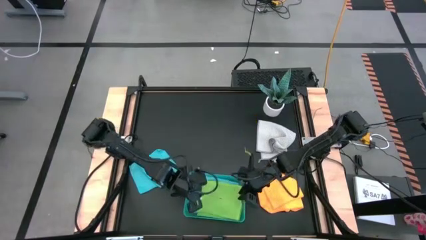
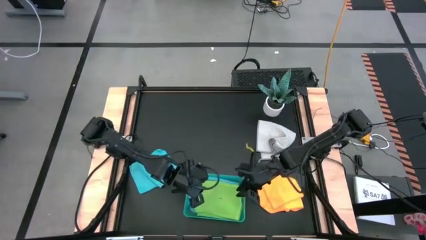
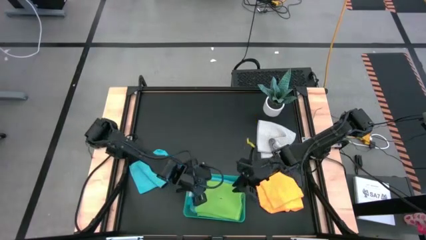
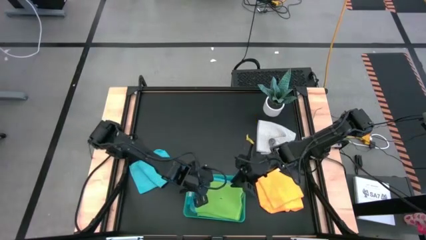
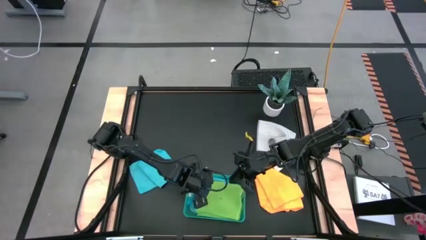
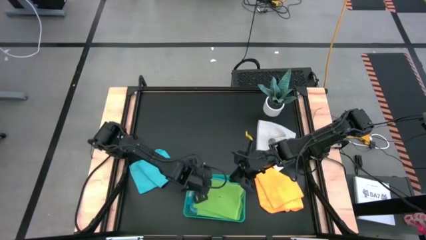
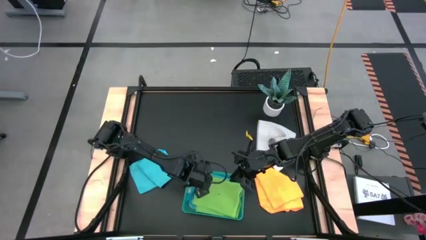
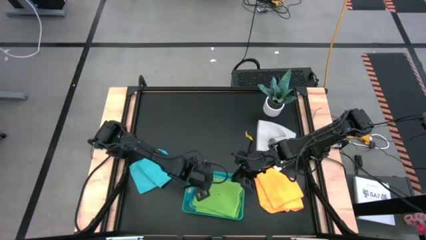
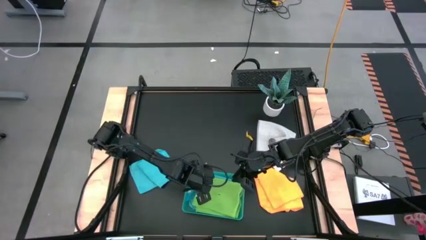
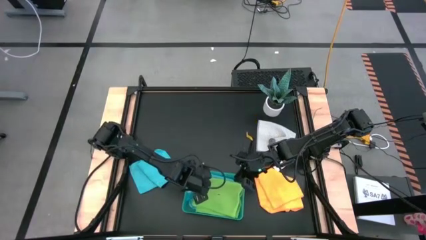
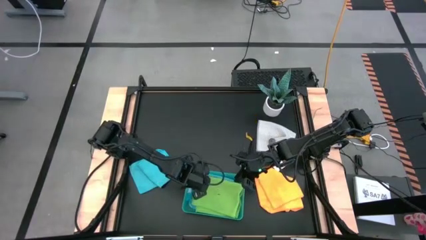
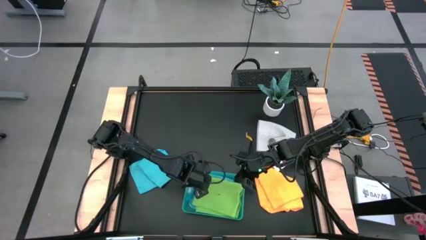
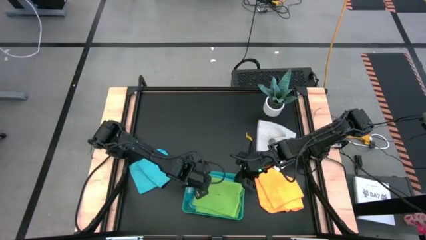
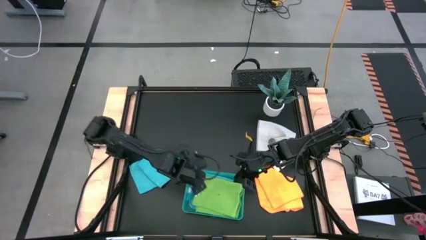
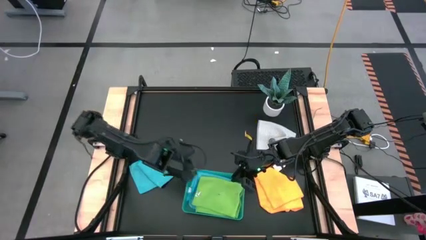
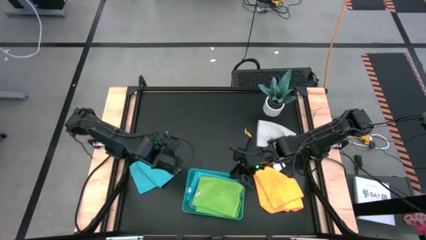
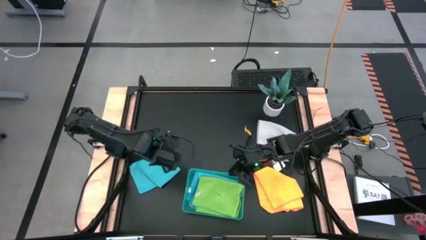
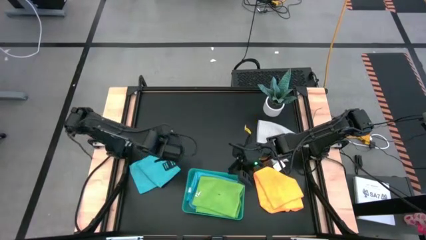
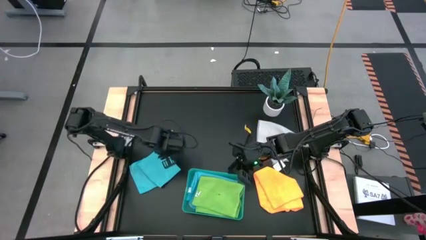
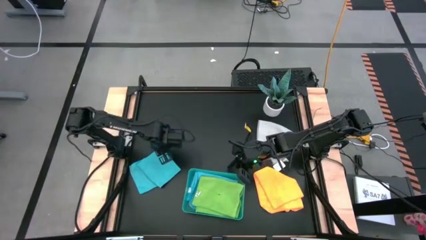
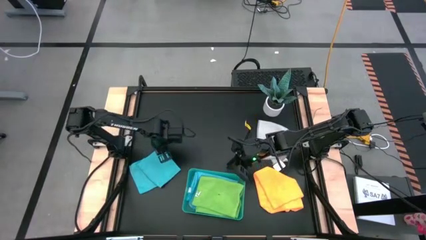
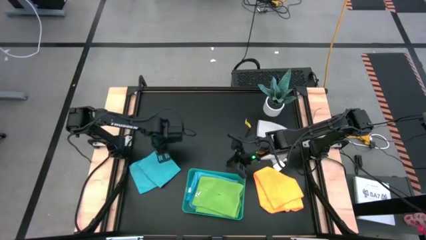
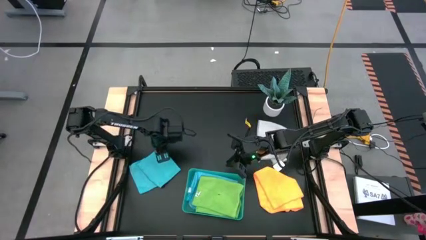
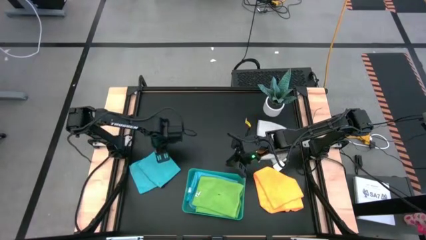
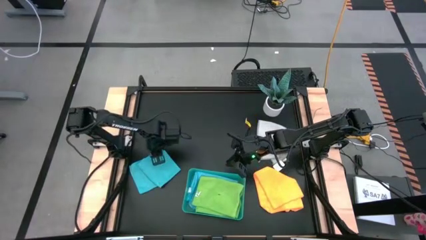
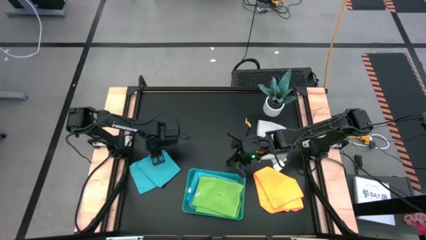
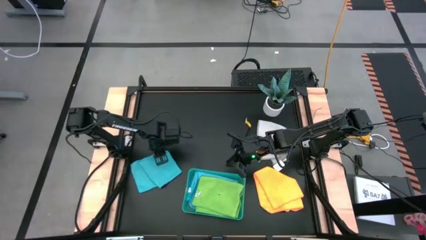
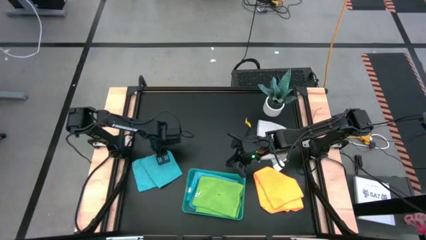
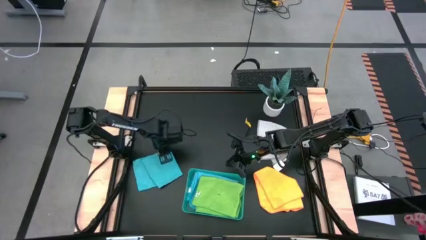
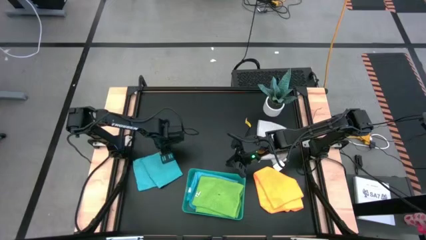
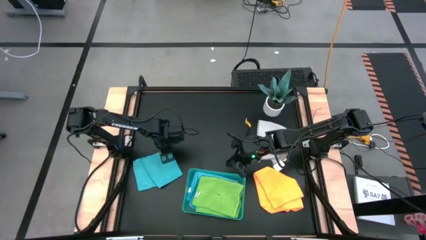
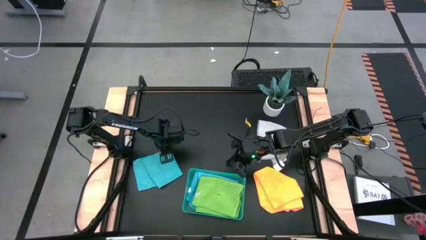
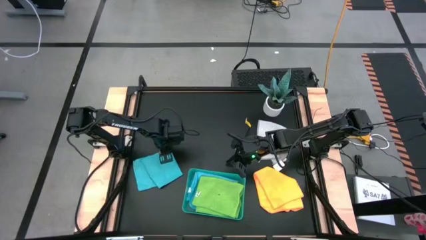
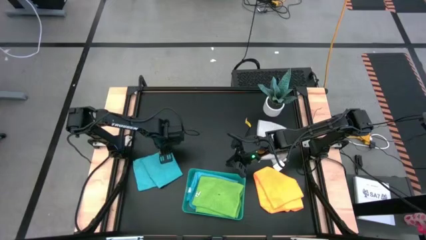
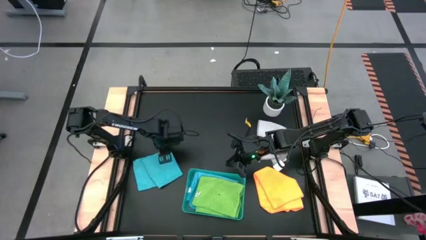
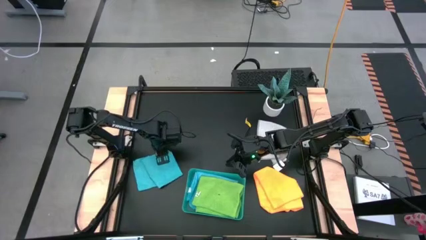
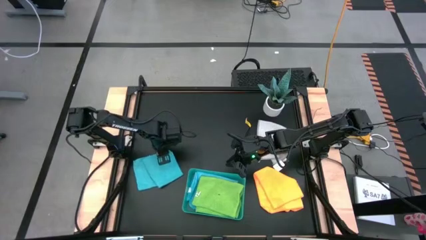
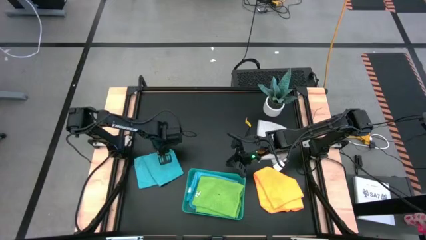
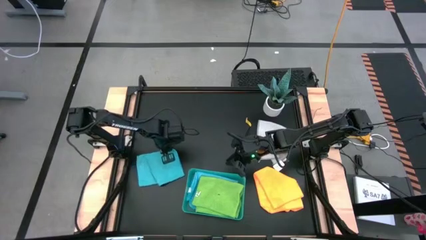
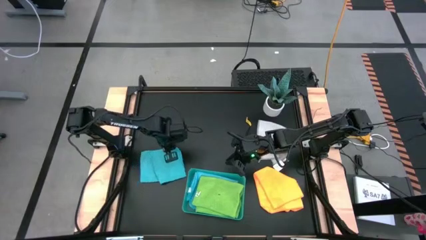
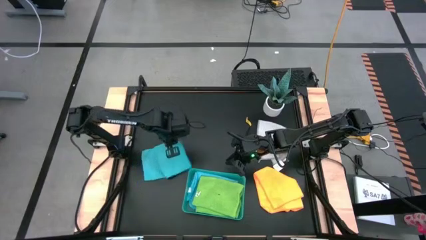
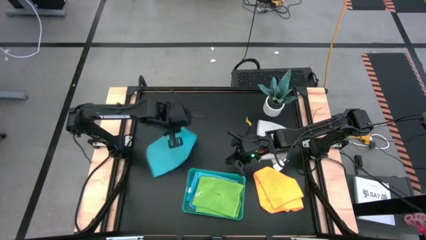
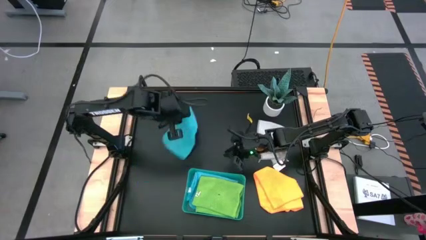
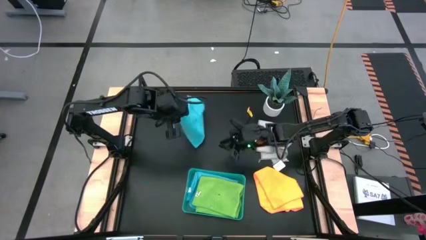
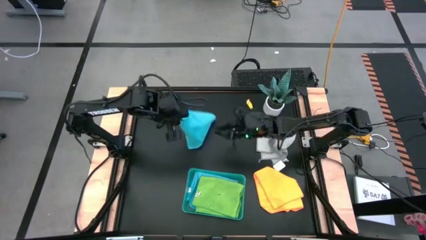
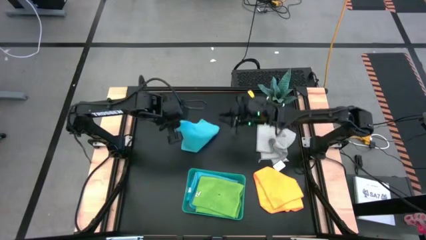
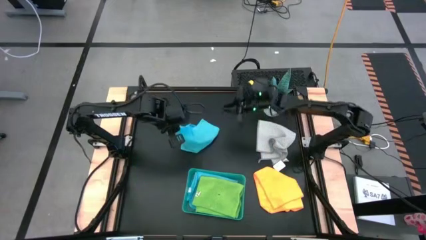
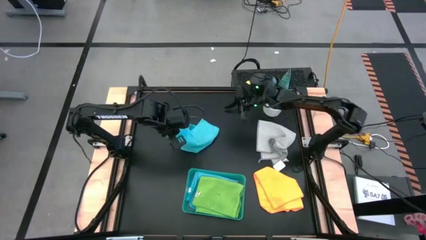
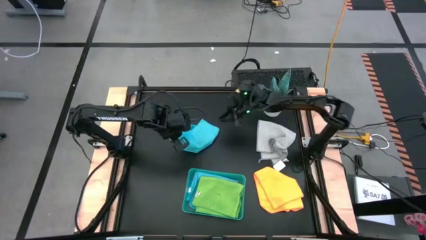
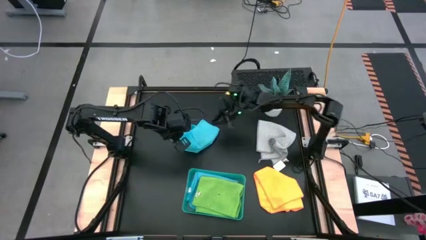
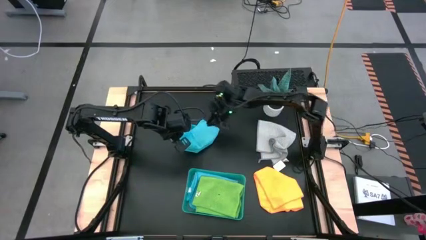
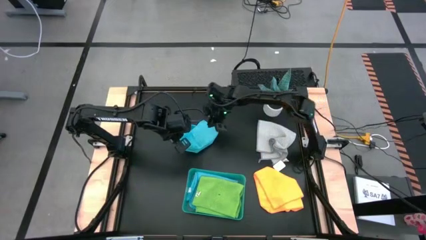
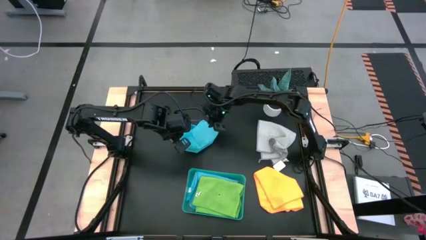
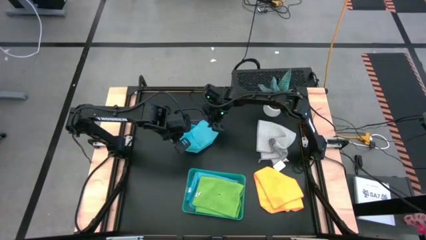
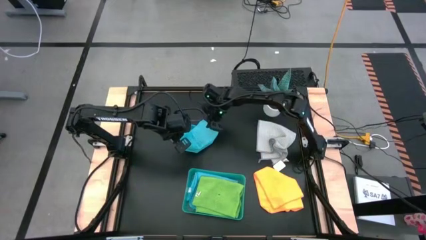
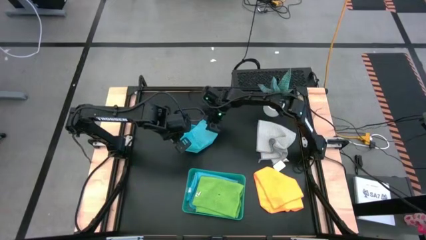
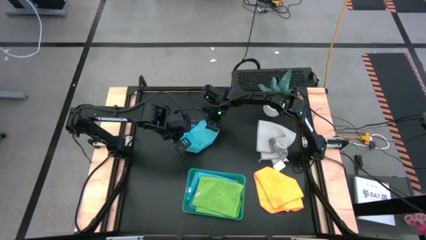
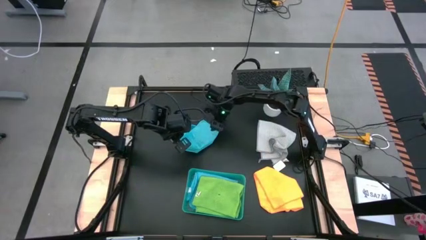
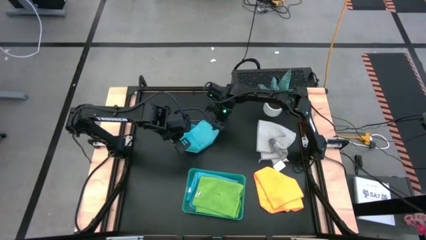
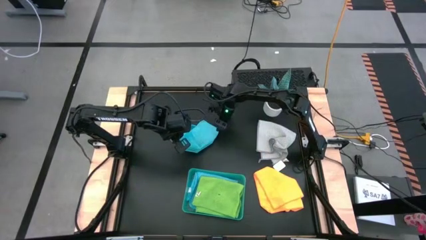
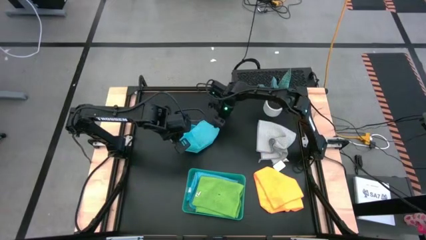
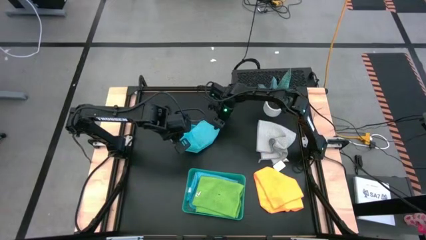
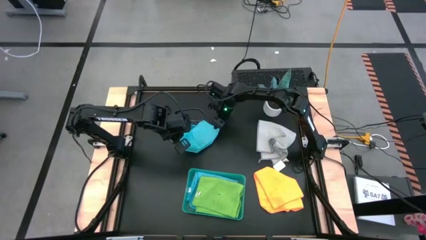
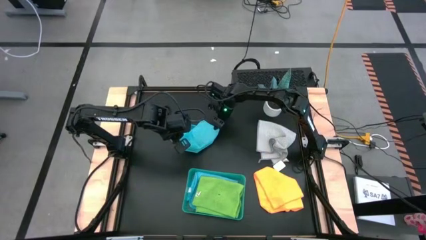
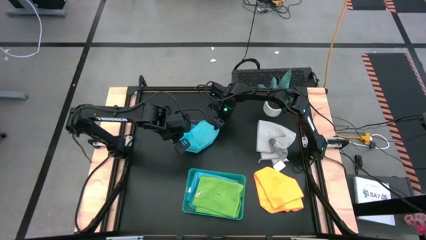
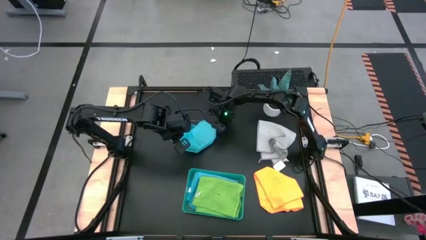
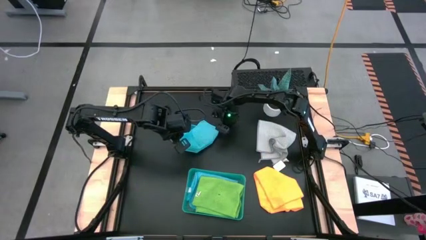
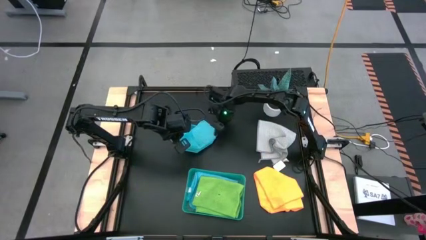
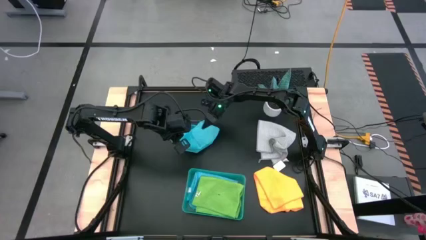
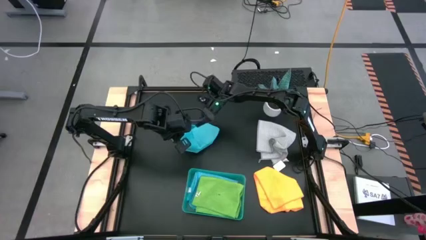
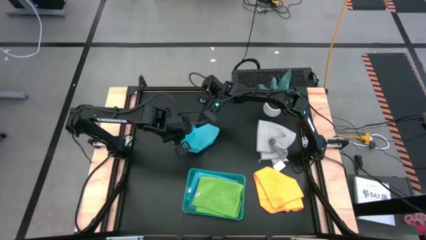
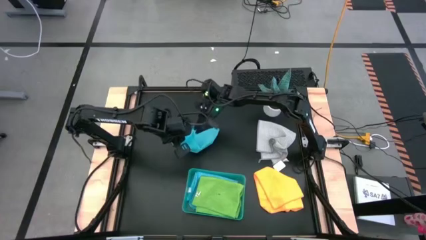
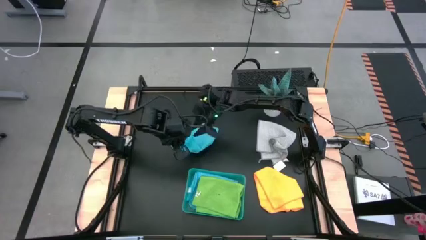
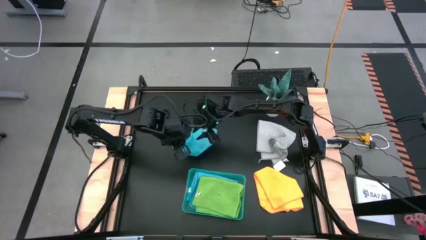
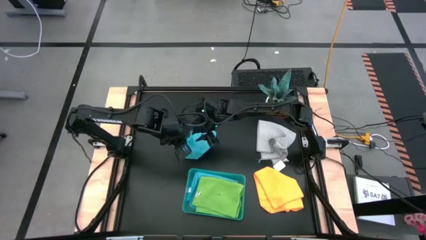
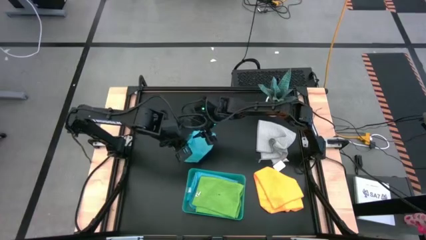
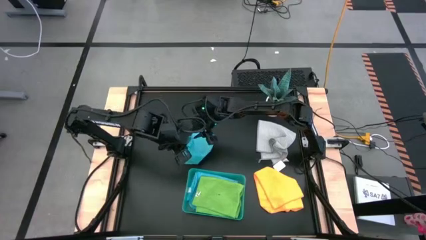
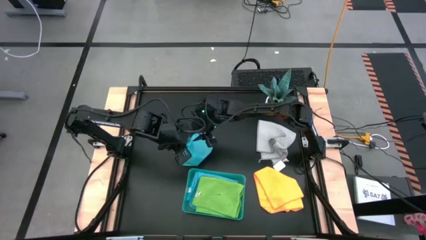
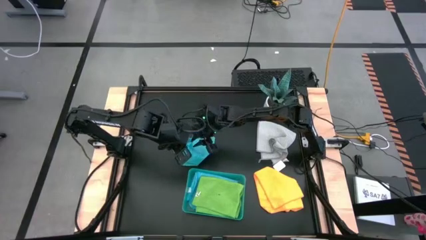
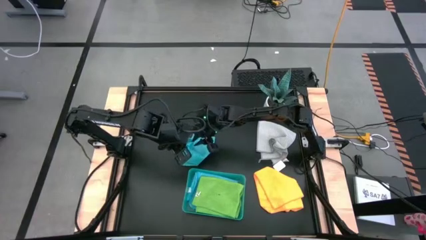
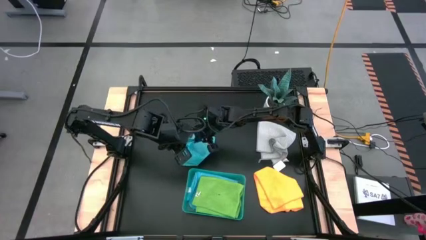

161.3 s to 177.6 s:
Task: Fold microfiber towels
Fold the blue microfiber cloth into a quarter
